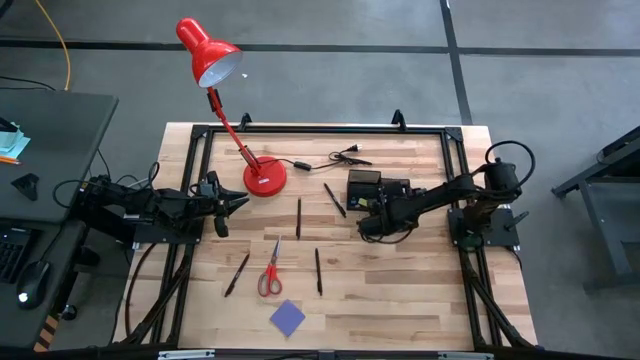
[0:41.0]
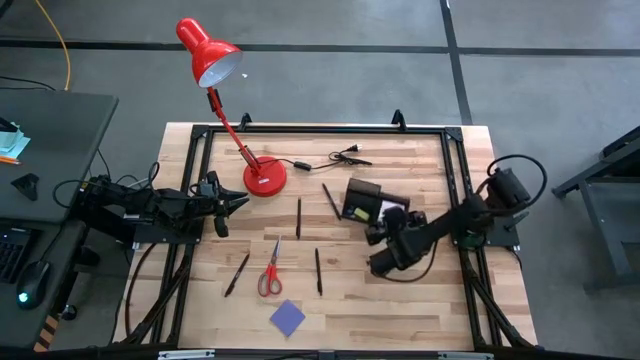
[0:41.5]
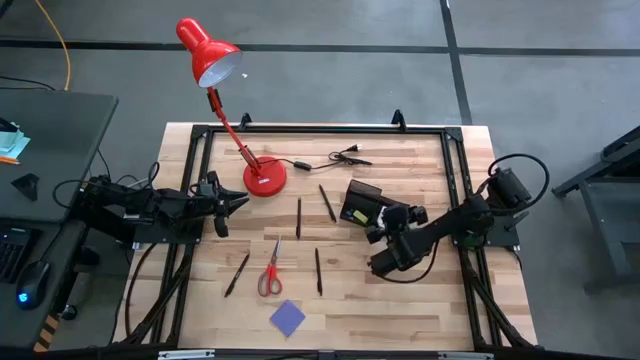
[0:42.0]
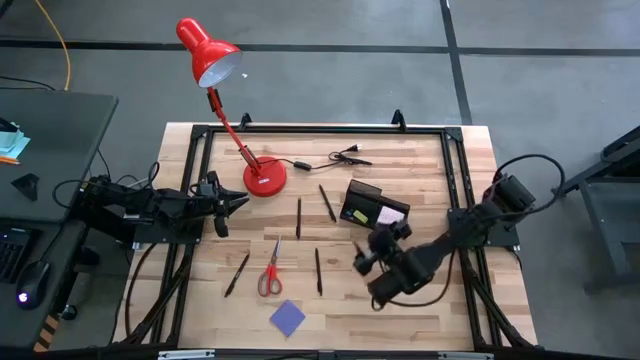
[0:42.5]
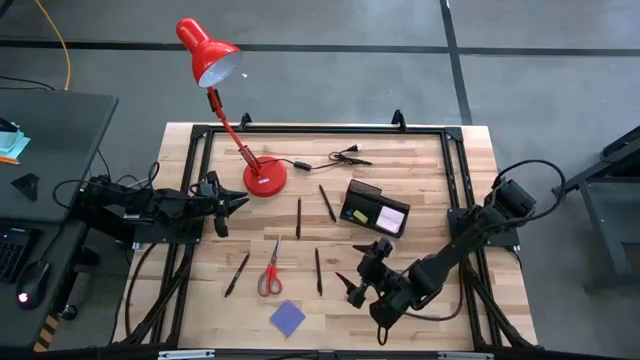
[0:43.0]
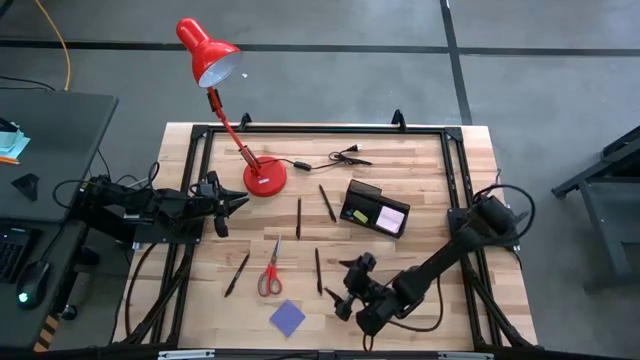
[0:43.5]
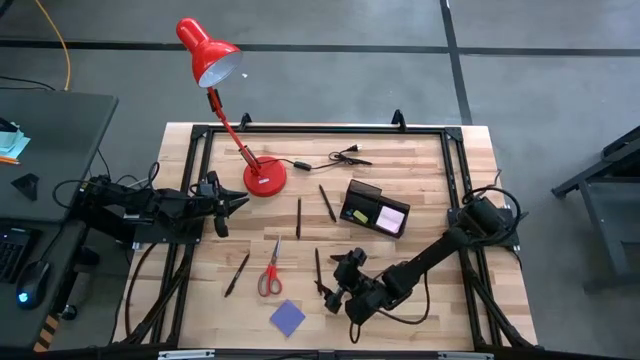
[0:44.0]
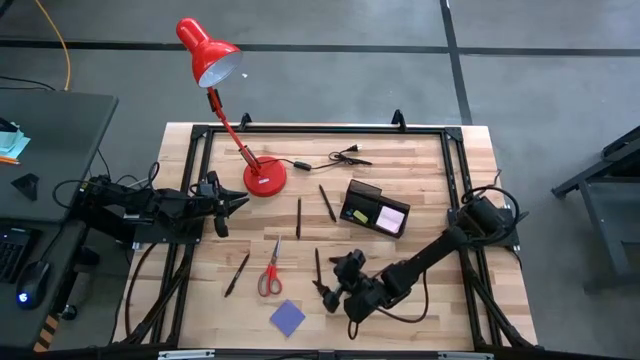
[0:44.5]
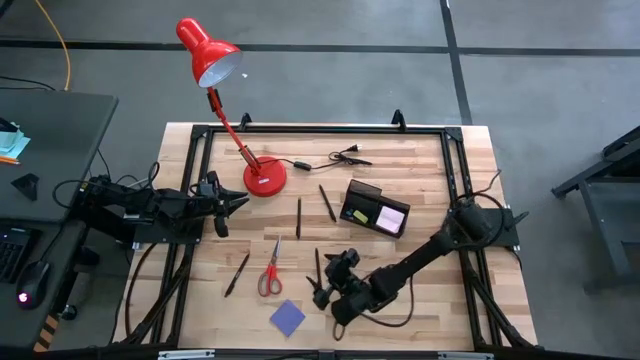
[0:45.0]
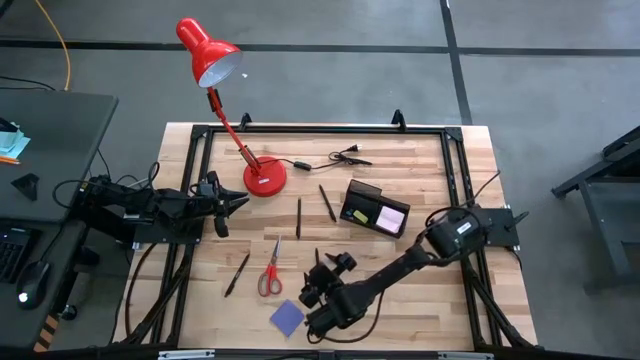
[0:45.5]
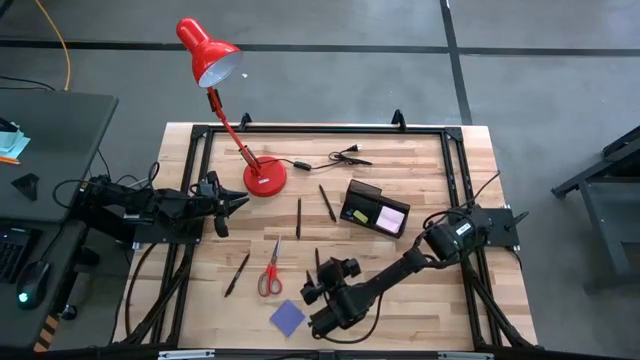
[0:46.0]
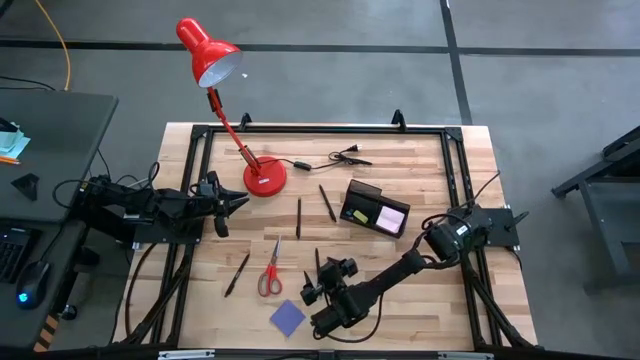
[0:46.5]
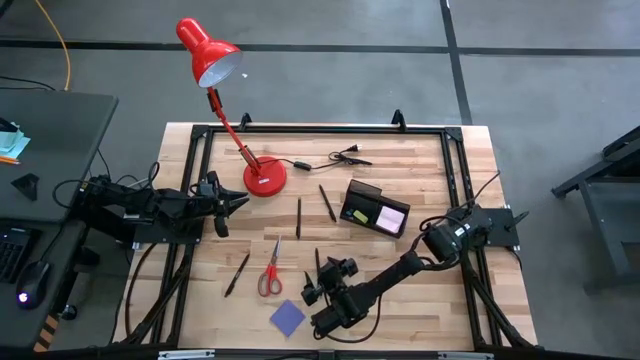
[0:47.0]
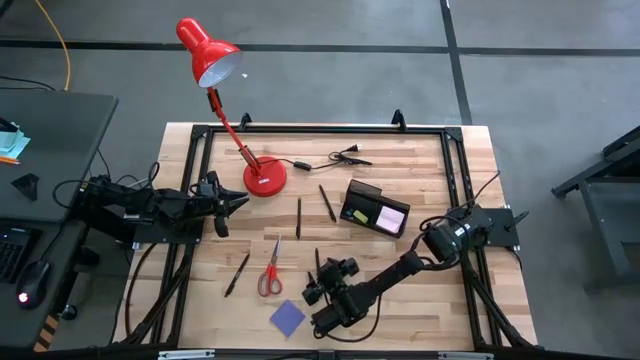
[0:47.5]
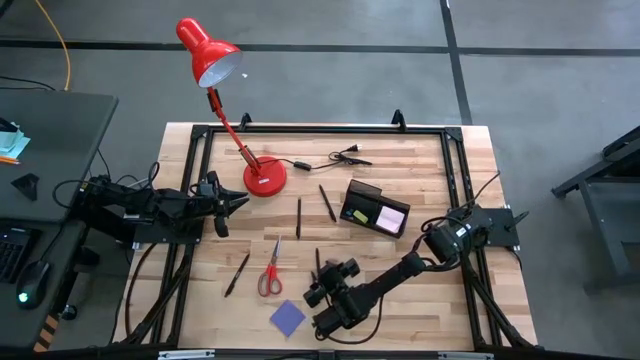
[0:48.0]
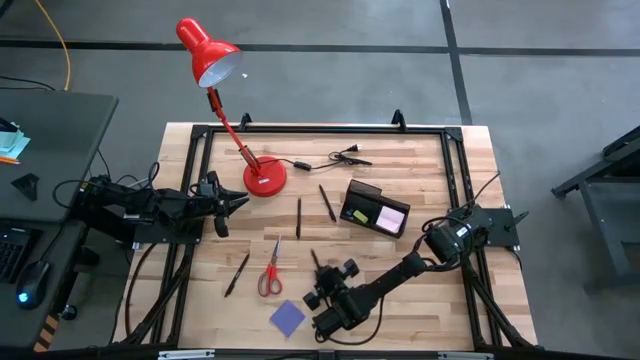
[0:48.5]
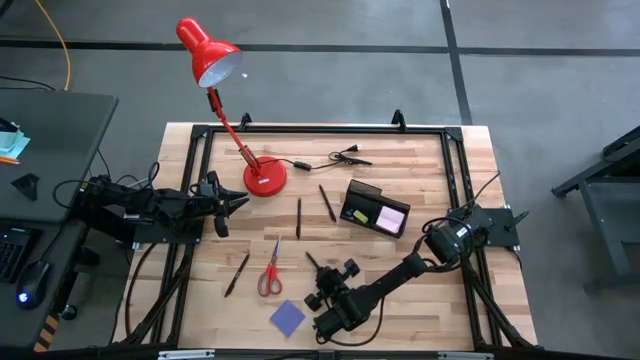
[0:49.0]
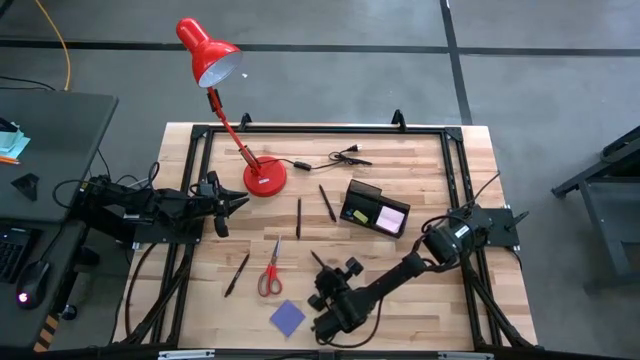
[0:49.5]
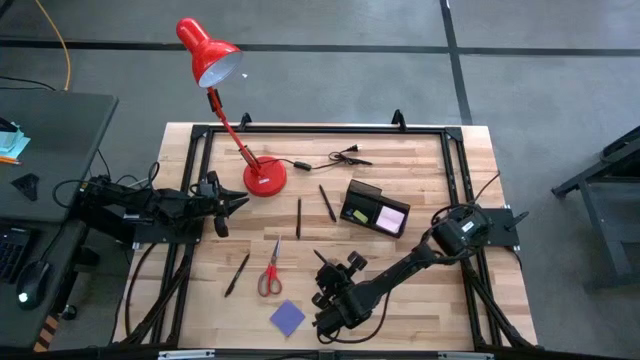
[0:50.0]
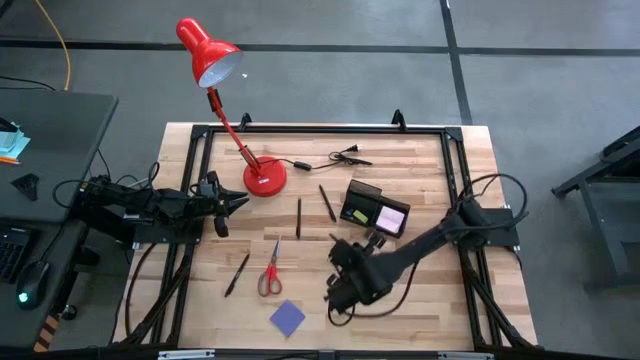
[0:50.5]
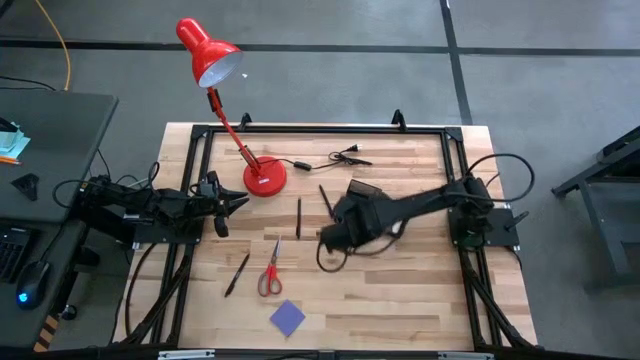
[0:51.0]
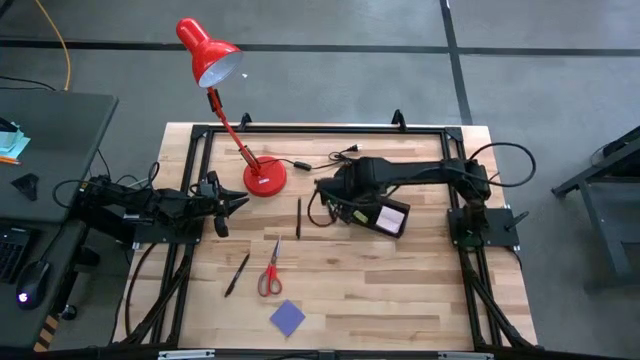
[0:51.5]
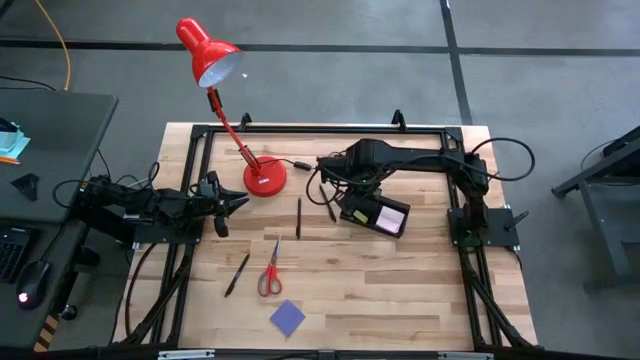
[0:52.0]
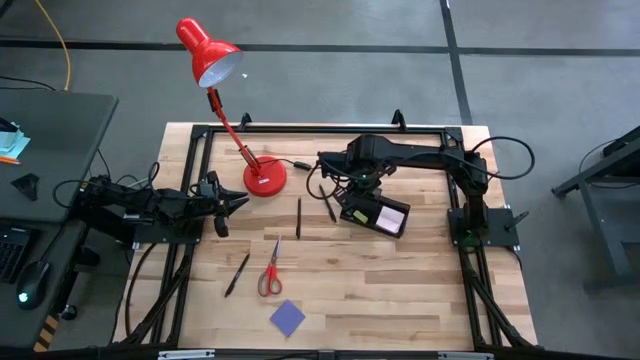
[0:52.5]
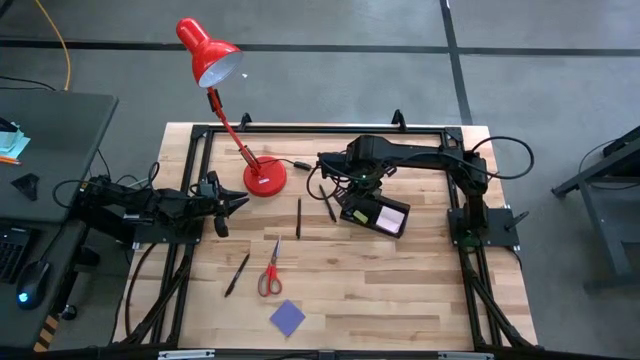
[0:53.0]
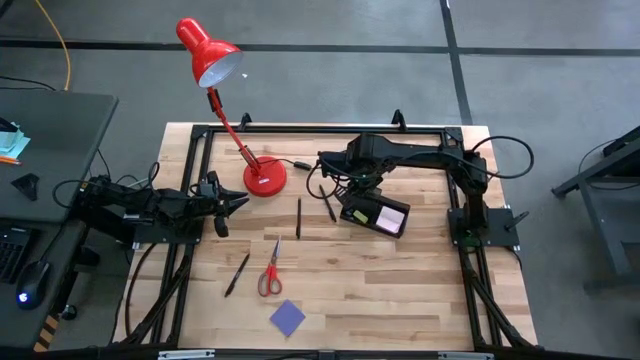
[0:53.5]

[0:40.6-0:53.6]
Task: Pick and place office supplies into organizer
Put the black pen into the desk organizer

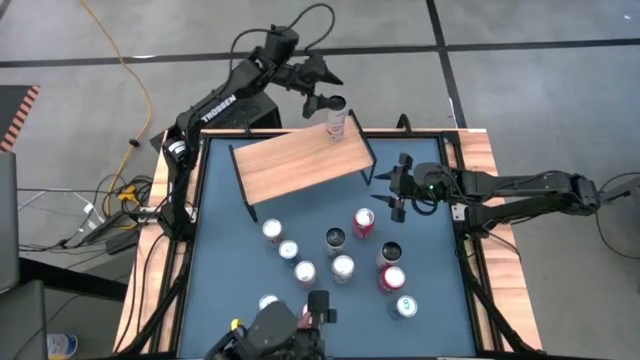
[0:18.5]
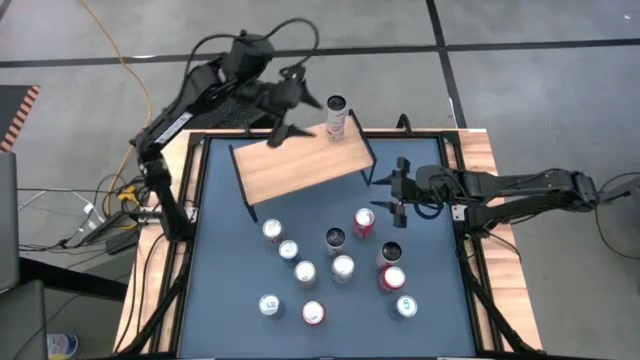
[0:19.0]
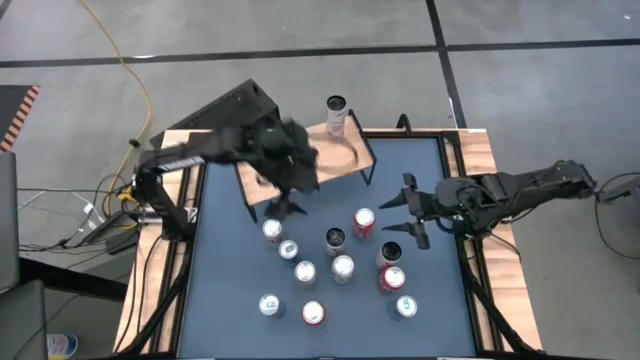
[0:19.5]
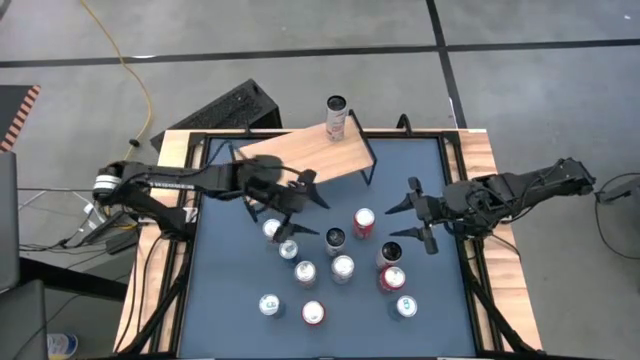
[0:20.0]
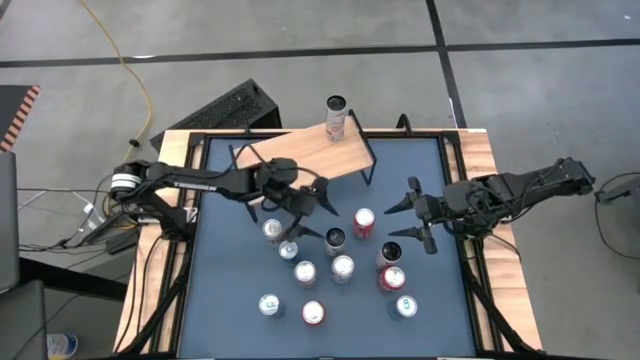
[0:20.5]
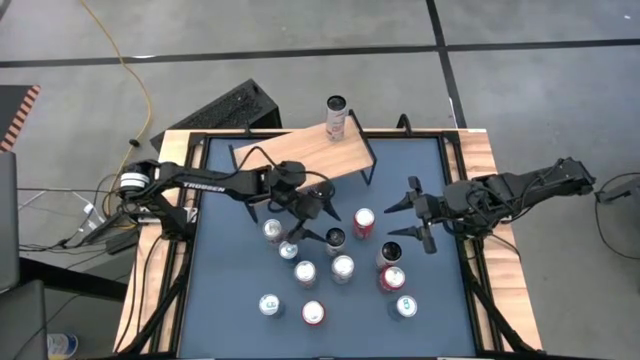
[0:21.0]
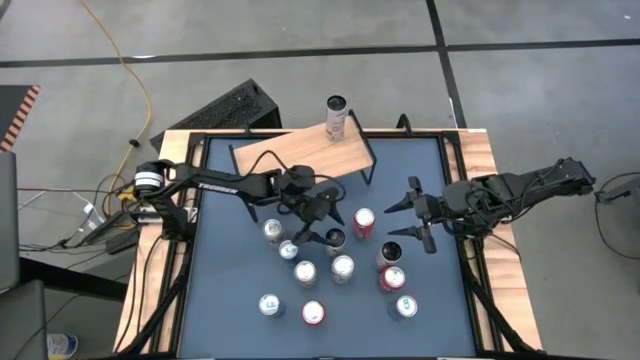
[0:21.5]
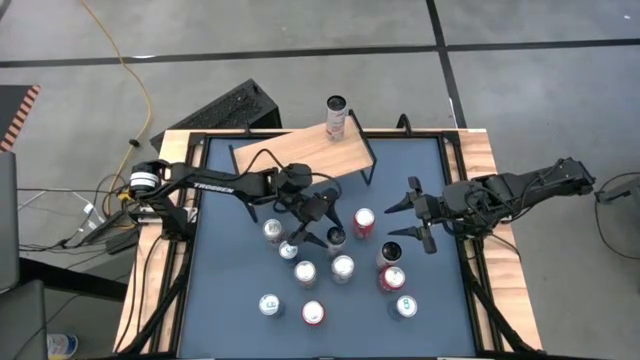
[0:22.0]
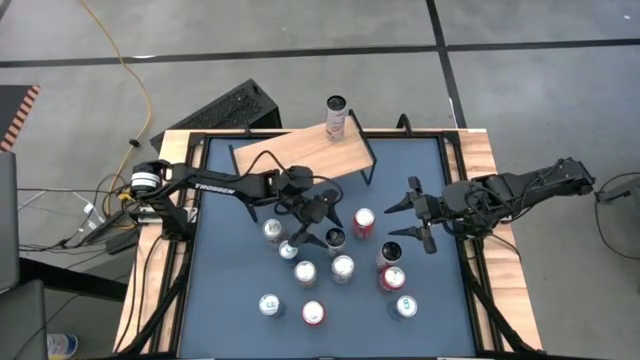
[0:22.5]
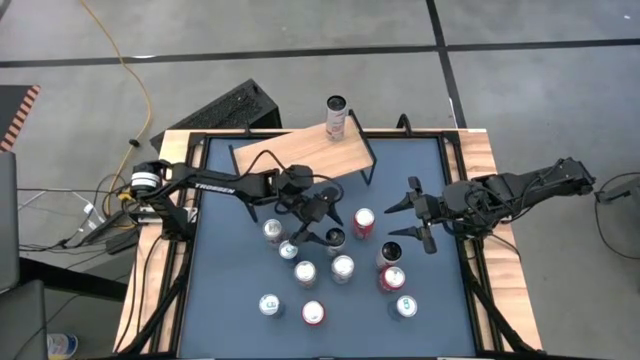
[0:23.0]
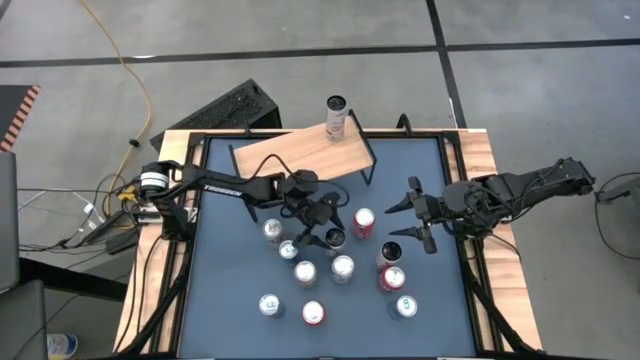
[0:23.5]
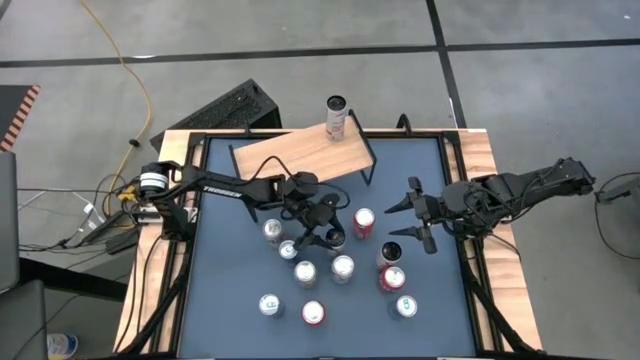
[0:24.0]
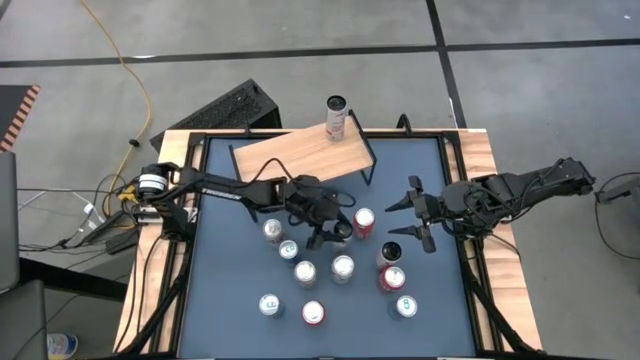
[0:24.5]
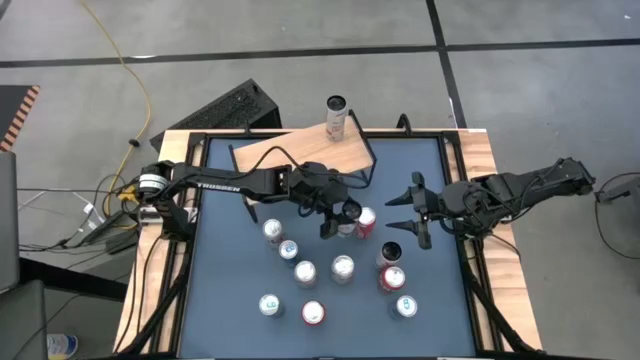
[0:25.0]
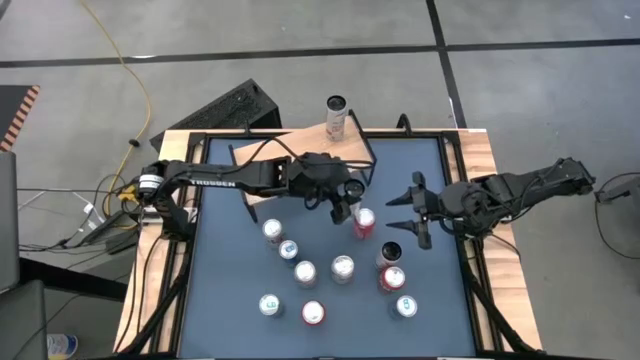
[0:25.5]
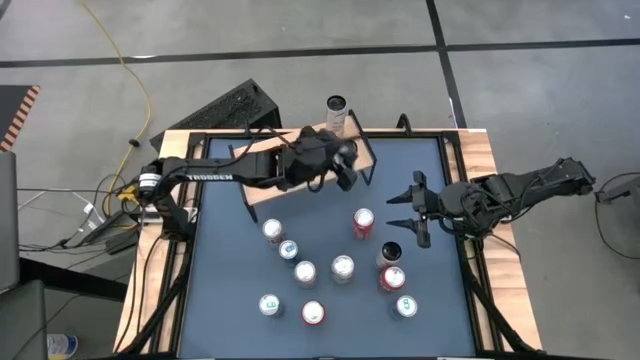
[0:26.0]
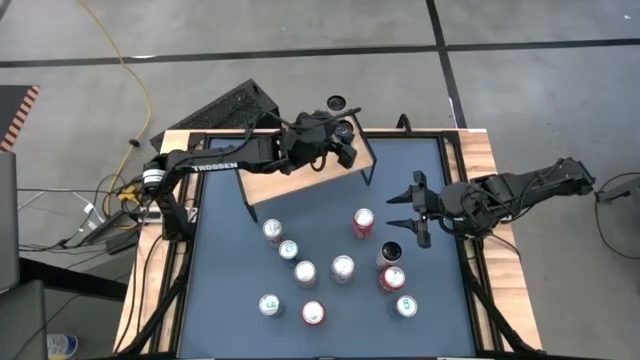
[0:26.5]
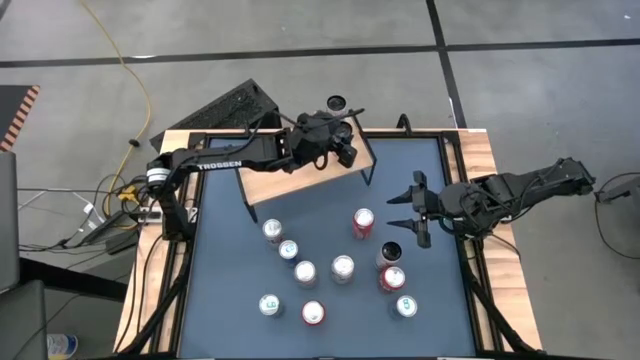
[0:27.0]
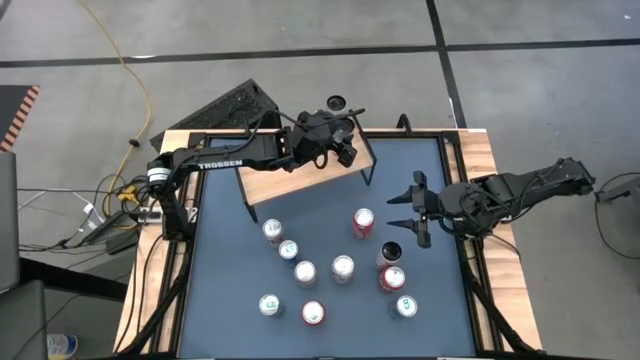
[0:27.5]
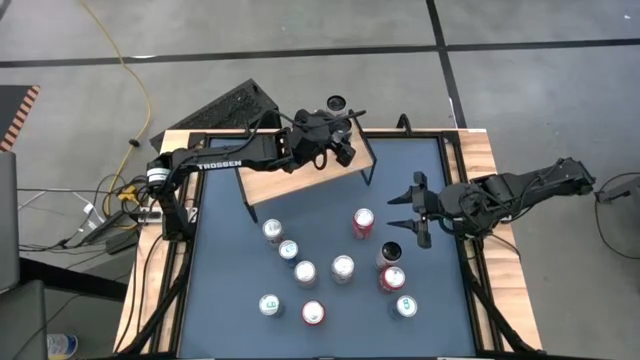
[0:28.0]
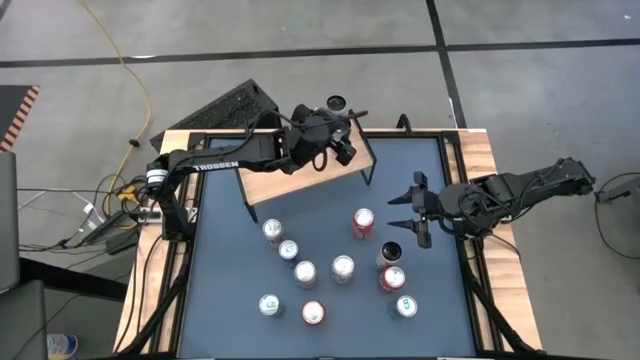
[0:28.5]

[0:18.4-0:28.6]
Task: Place canned beverage on shelf
Put the left white pink soda can on the shelf aligned with the other white pink soda can
